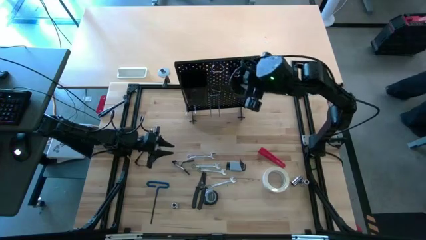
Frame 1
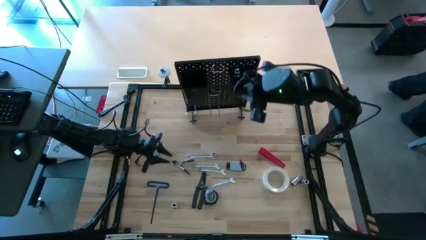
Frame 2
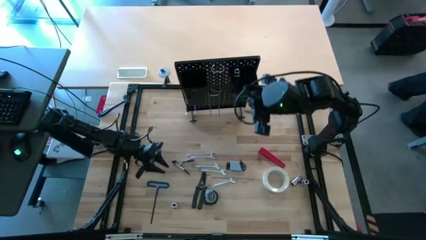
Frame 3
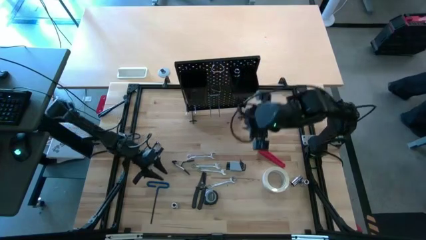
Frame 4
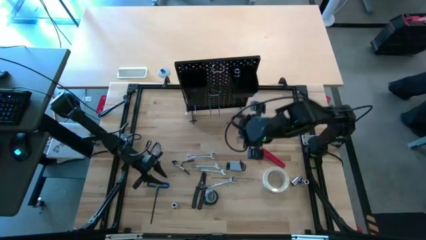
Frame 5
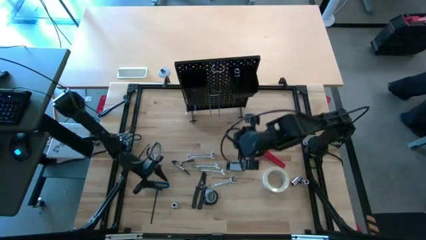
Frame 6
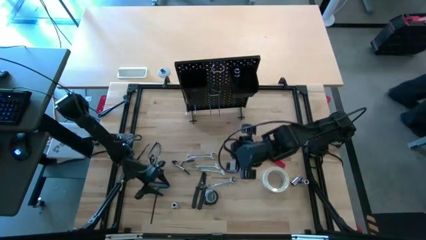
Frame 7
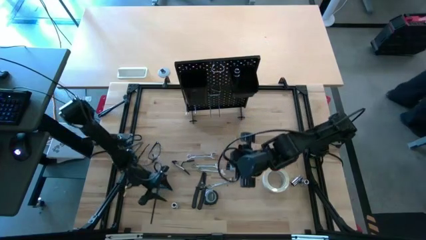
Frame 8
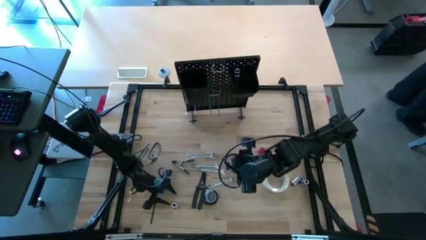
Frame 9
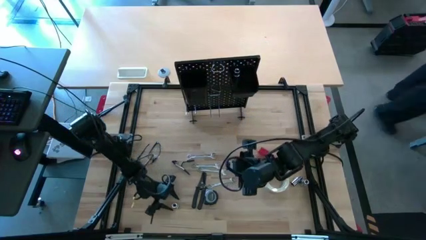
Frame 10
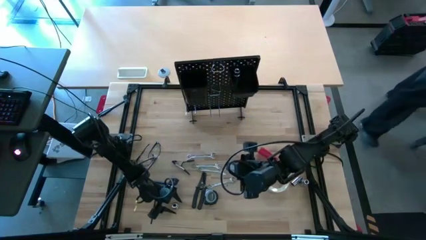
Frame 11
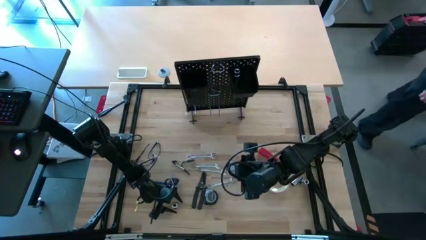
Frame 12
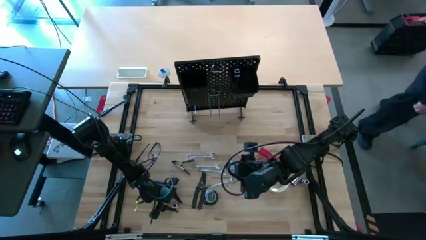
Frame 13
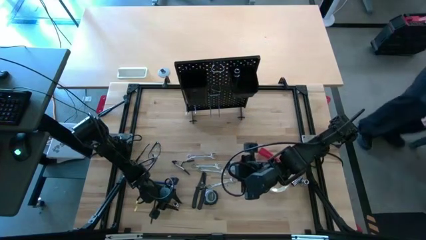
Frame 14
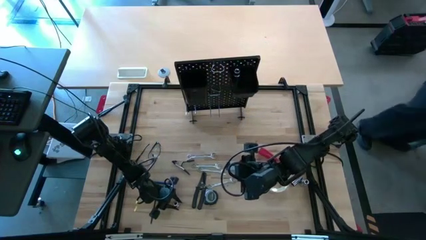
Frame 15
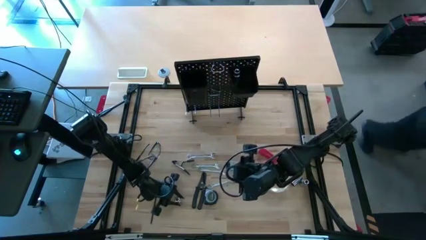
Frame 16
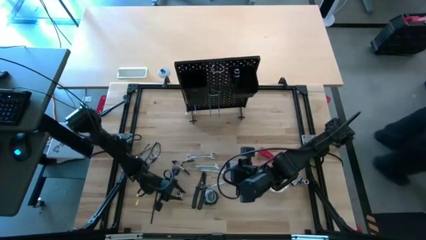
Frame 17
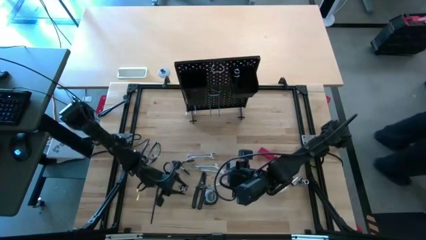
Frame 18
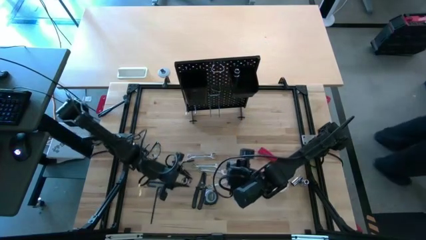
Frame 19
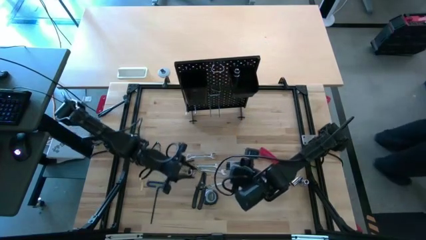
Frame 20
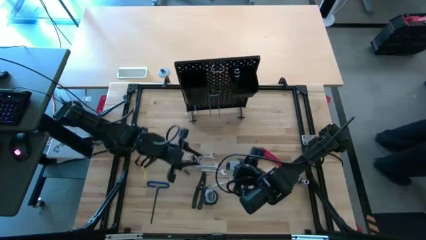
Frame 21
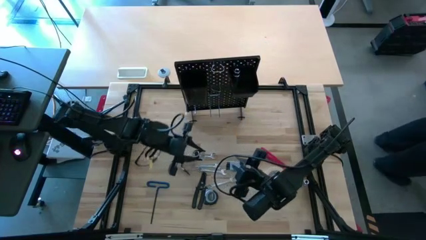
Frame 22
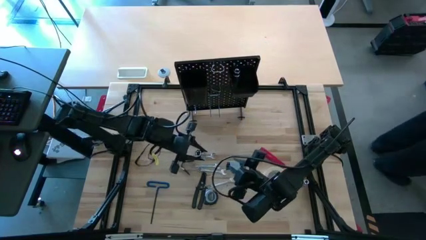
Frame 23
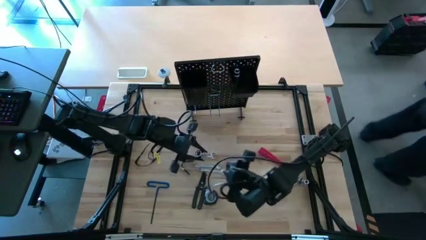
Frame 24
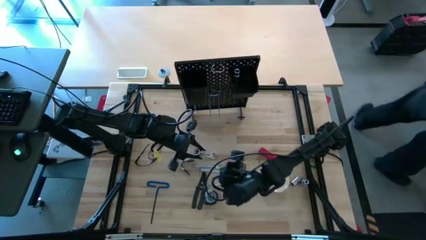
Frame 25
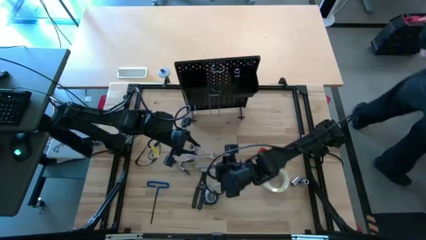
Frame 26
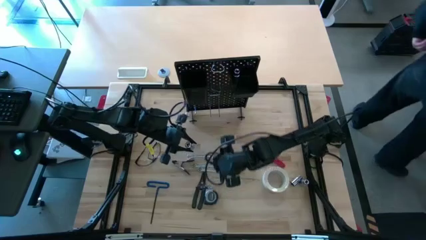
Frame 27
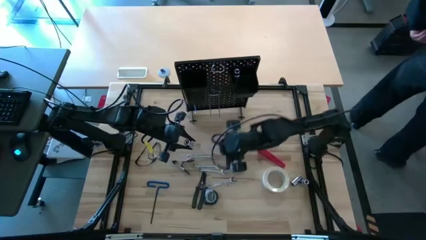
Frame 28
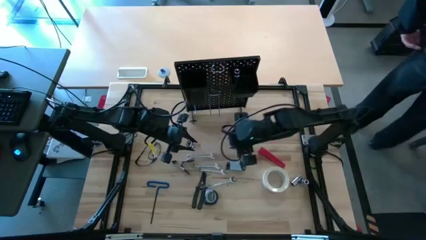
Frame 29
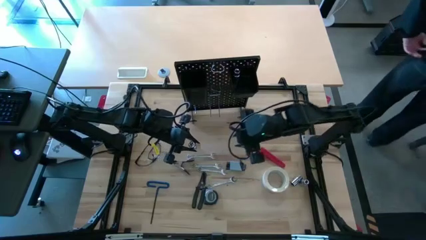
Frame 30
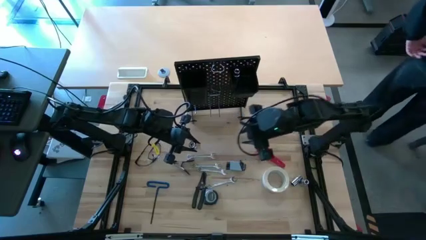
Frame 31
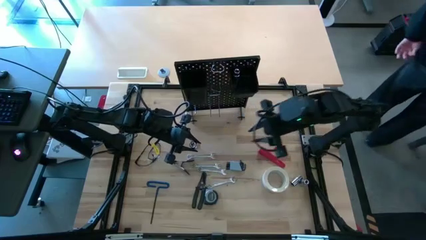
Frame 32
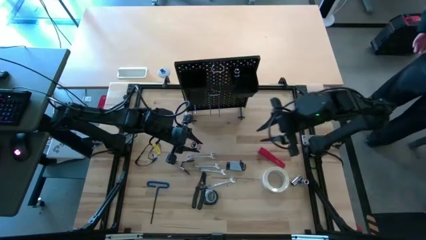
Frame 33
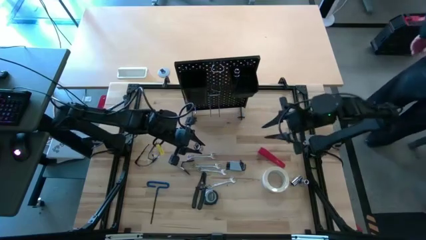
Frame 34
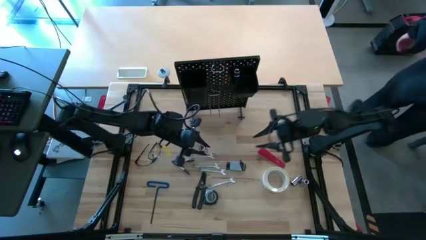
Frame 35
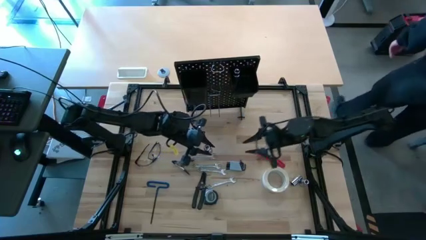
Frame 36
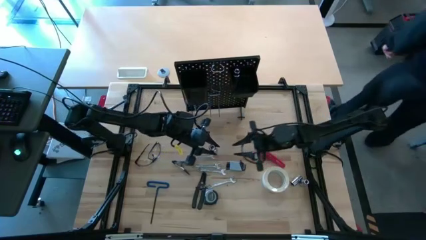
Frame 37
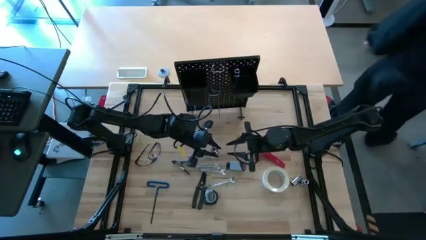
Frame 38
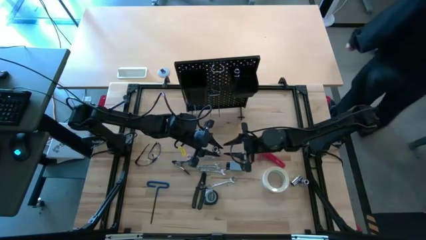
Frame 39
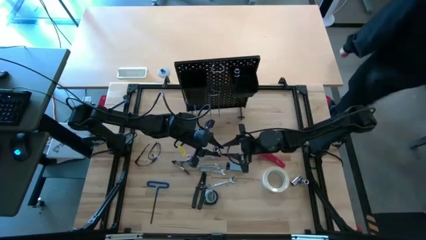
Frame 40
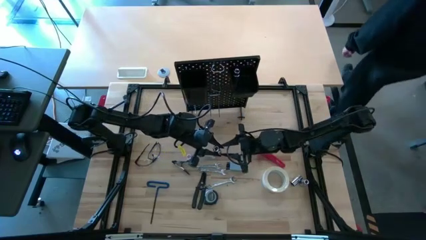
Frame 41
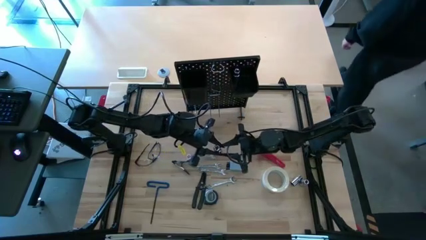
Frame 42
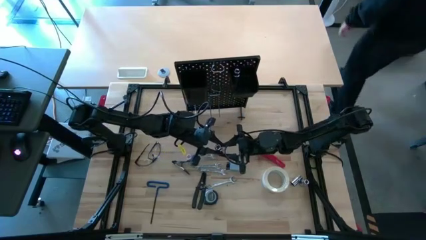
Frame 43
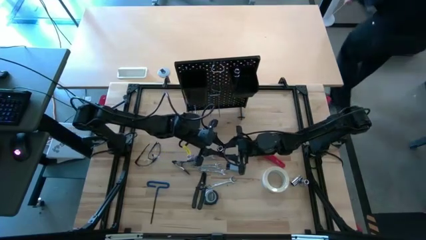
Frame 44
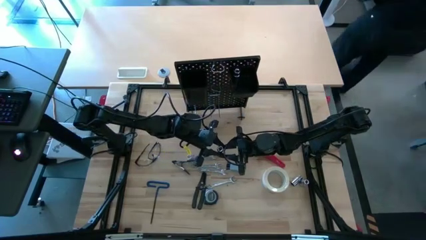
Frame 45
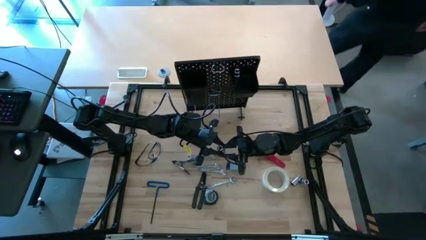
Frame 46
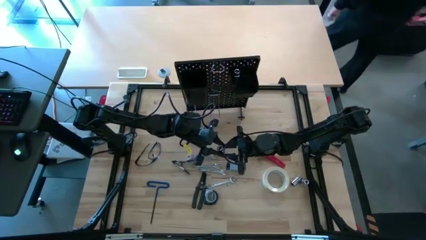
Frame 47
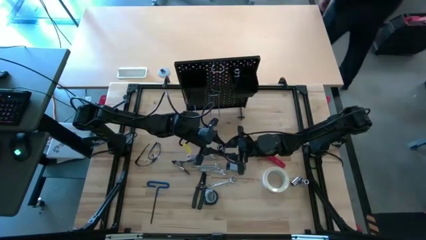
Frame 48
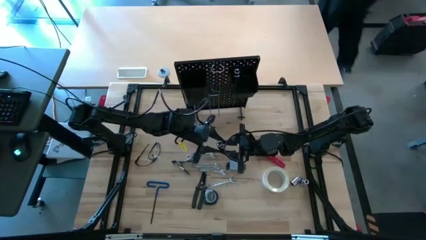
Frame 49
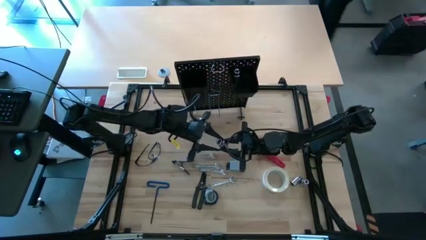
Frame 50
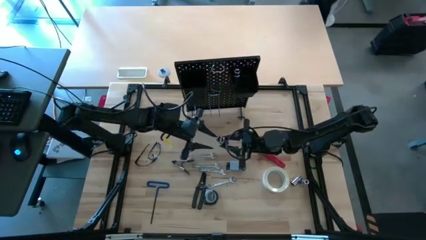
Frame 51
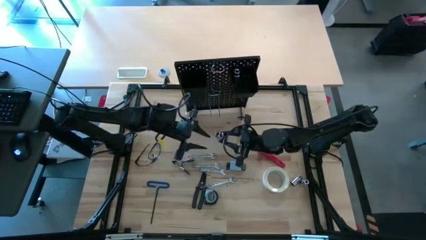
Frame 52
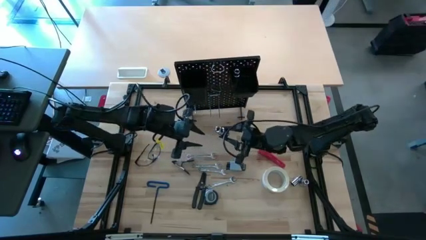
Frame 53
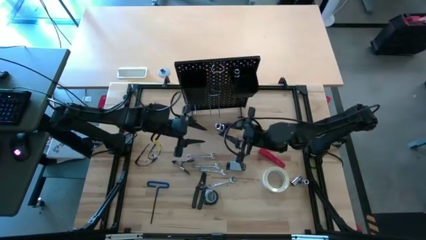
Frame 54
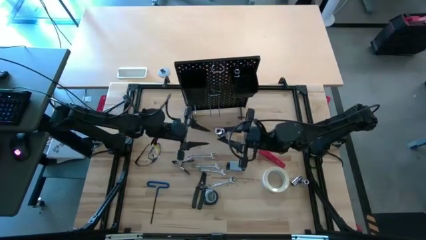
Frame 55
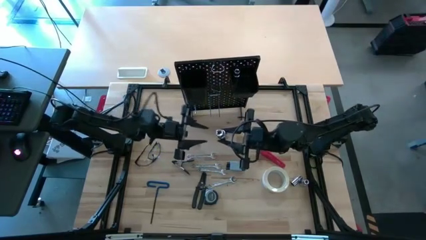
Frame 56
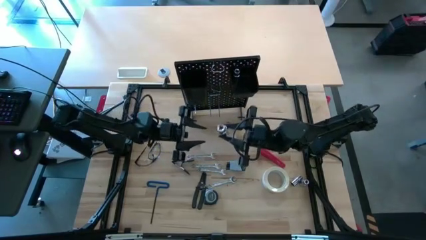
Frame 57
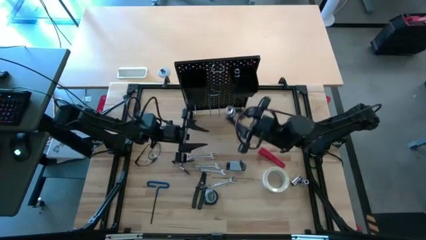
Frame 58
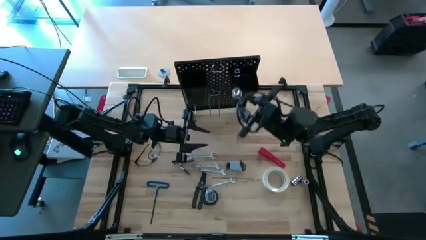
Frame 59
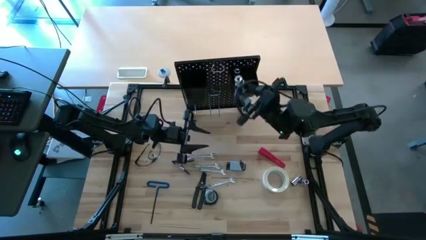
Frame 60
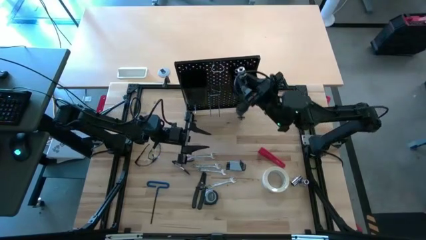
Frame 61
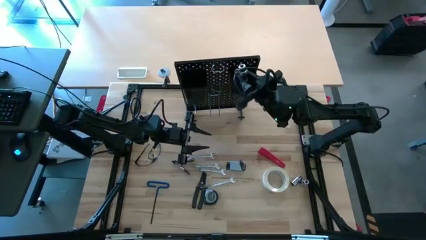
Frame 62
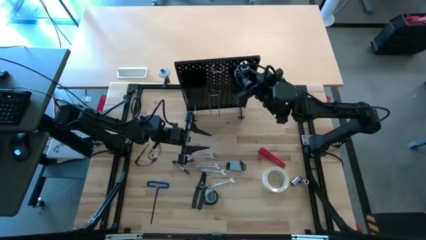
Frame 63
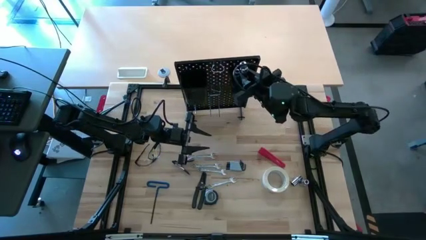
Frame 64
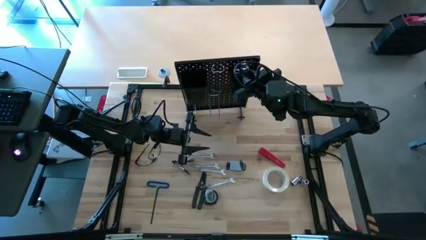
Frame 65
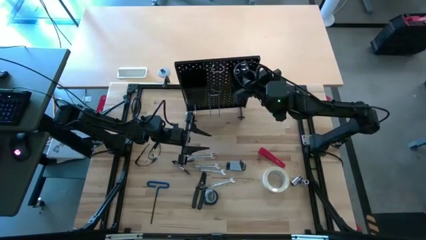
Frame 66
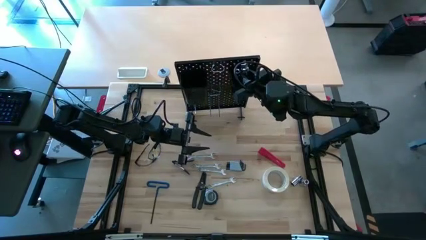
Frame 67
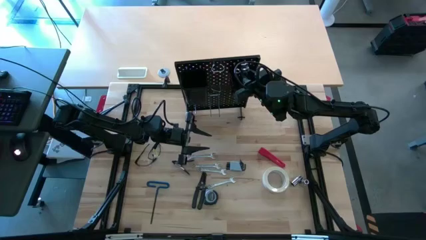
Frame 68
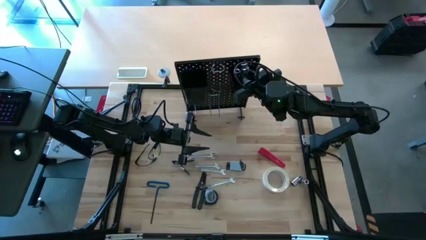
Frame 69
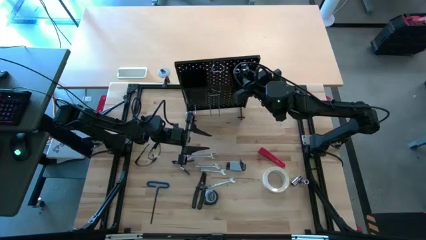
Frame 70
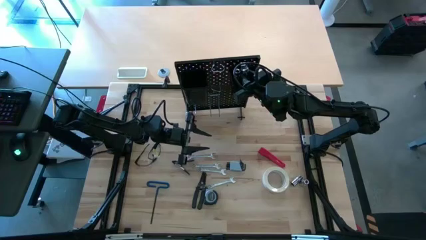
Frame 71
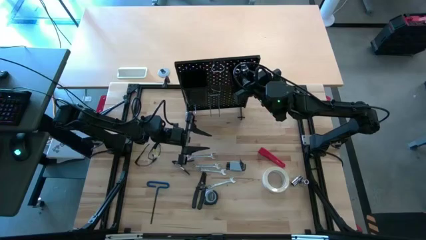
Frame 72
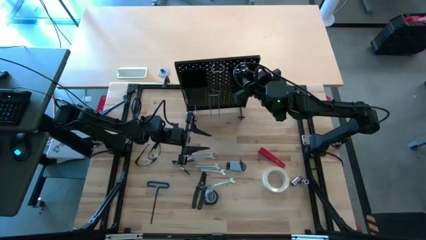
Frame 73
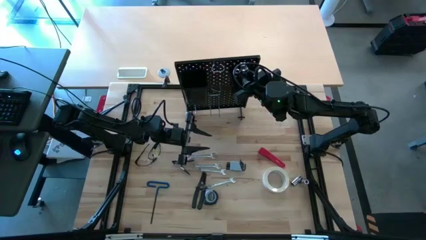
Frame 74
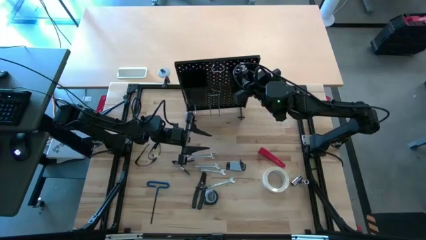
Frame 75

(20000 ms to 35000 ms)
Task: Hang tools onto peg board
Put the bottom silver socket into the black bin on the pegboard
